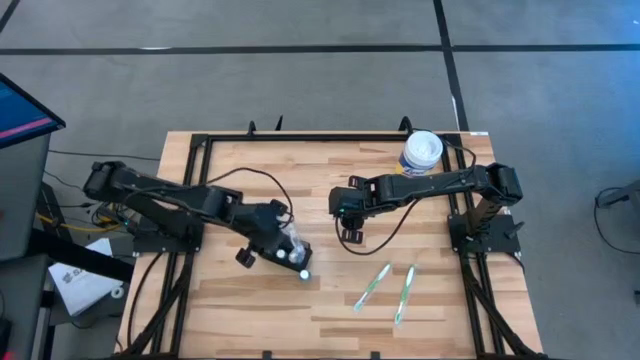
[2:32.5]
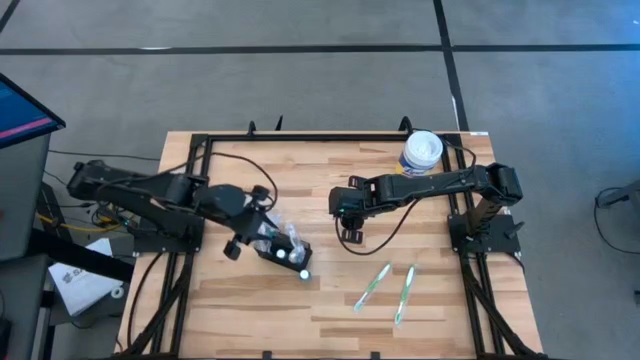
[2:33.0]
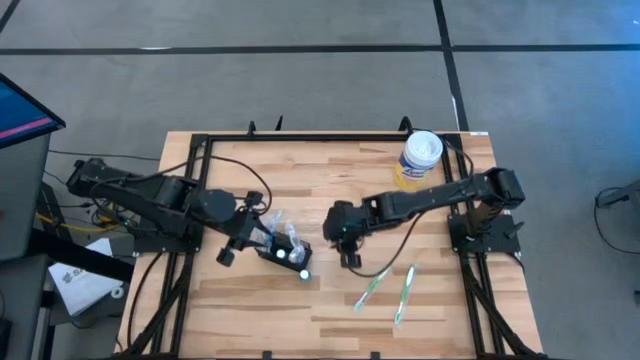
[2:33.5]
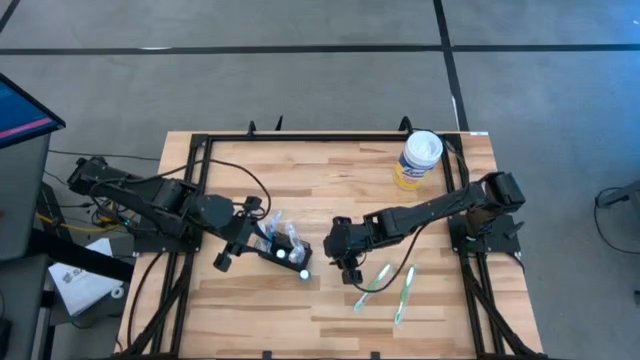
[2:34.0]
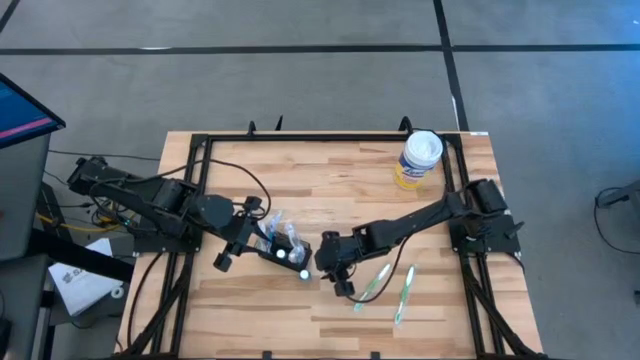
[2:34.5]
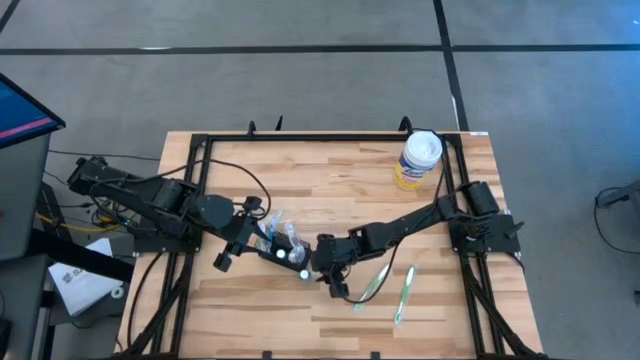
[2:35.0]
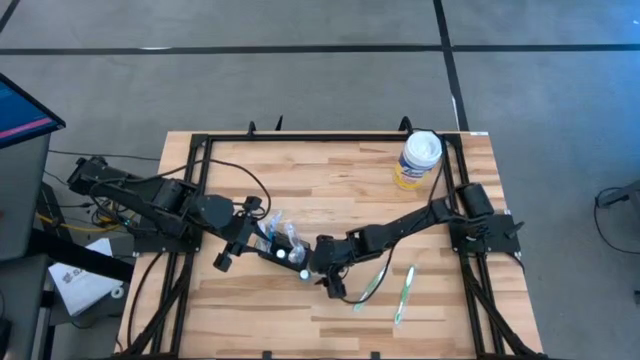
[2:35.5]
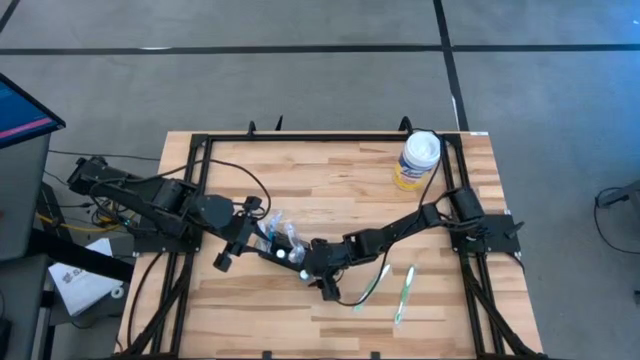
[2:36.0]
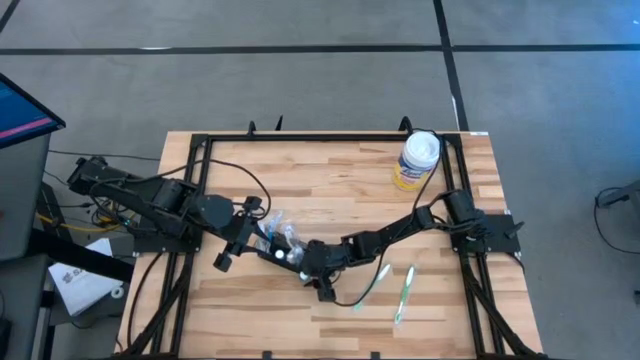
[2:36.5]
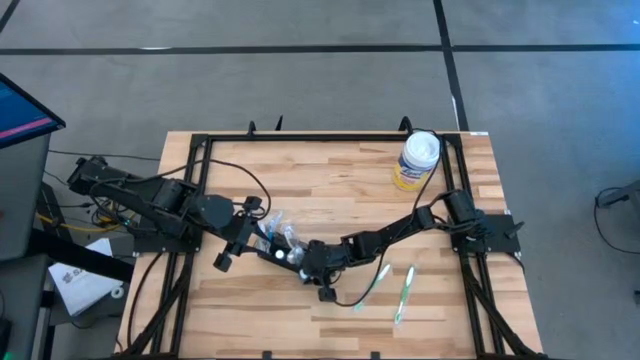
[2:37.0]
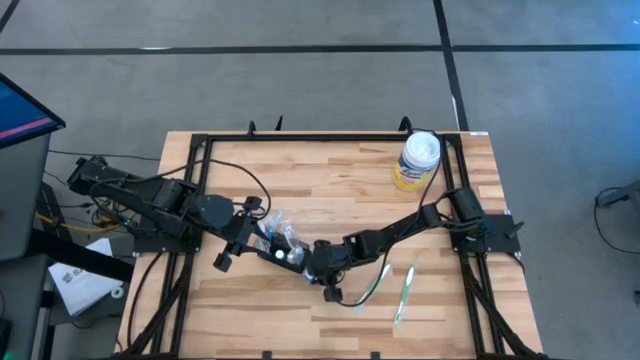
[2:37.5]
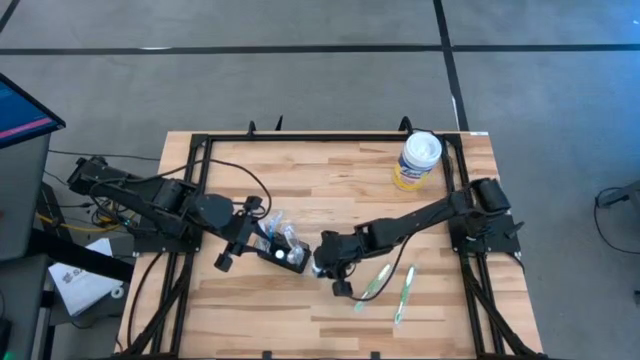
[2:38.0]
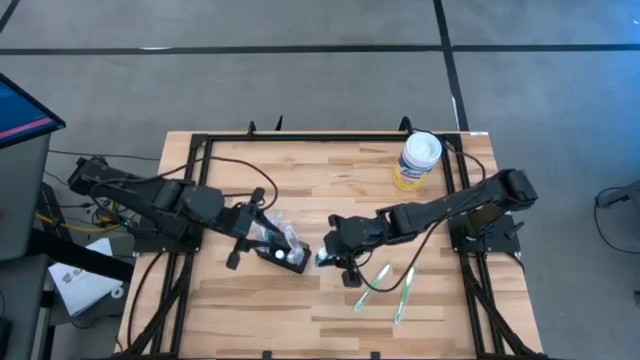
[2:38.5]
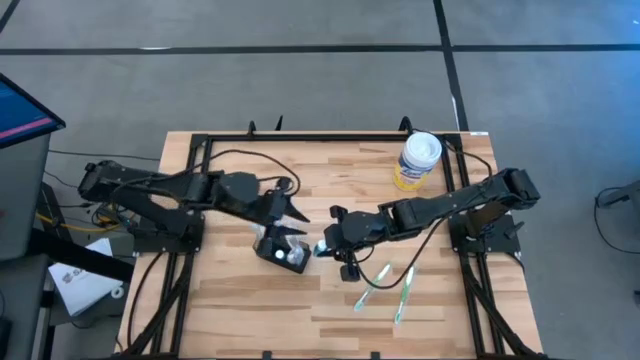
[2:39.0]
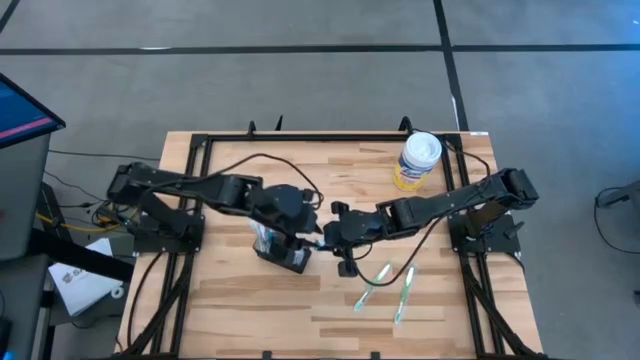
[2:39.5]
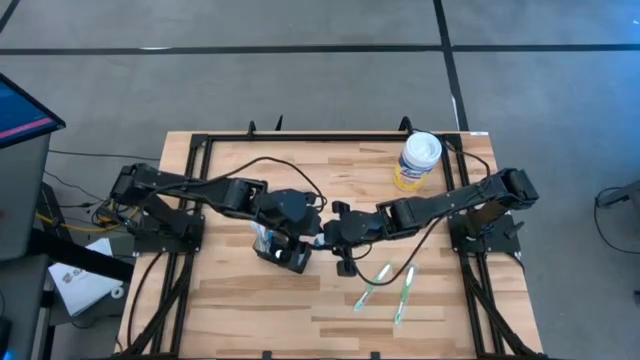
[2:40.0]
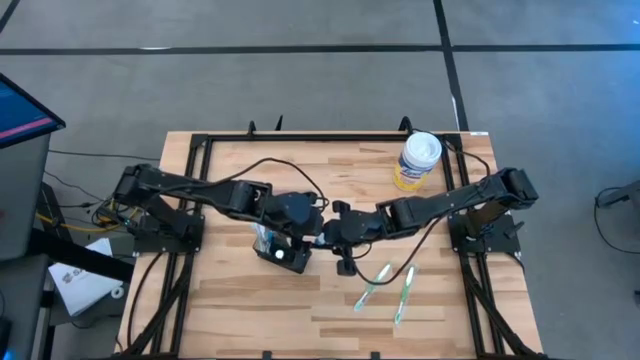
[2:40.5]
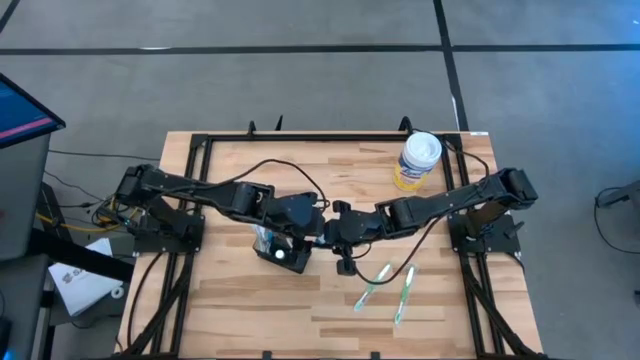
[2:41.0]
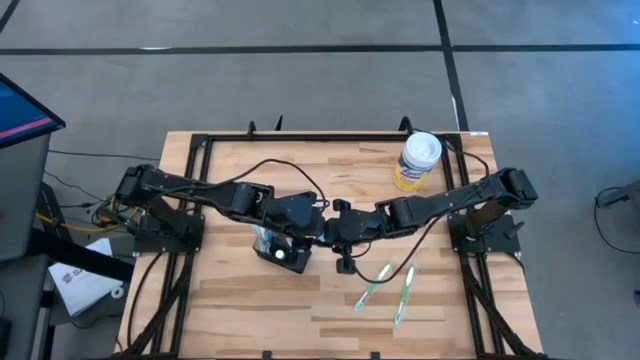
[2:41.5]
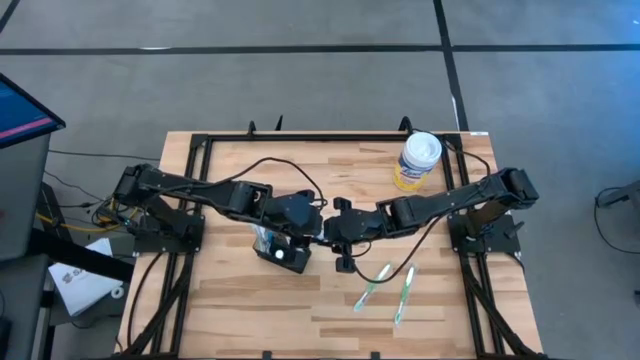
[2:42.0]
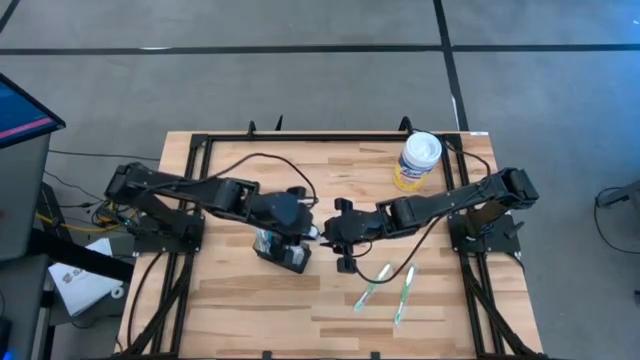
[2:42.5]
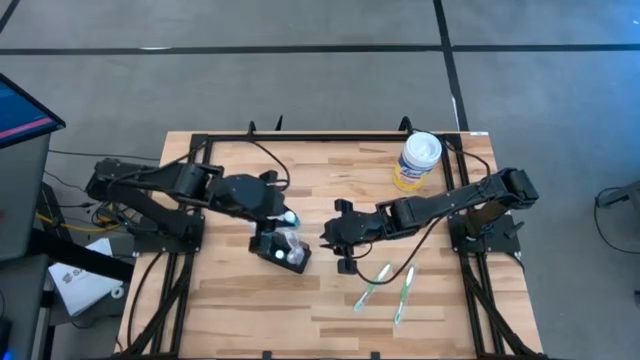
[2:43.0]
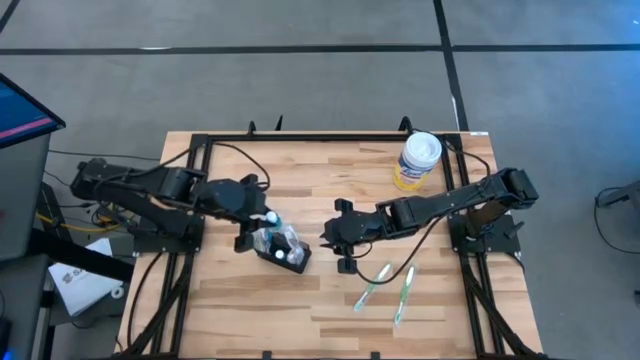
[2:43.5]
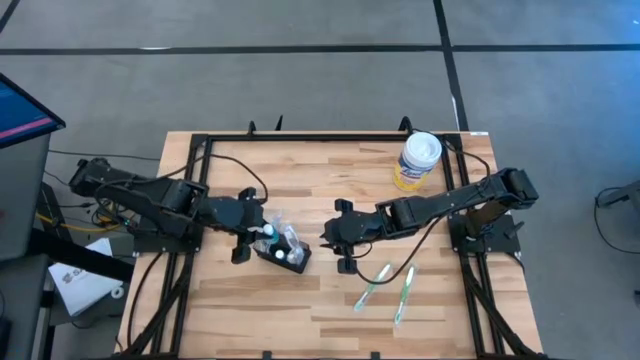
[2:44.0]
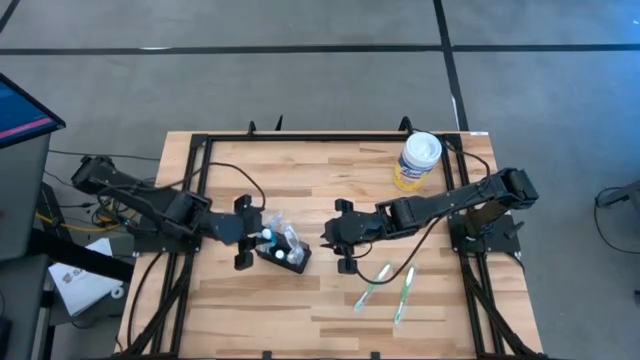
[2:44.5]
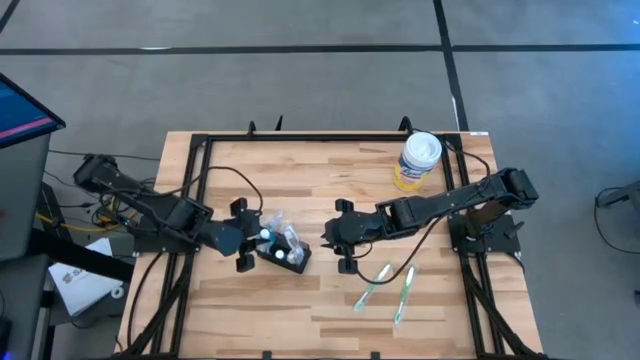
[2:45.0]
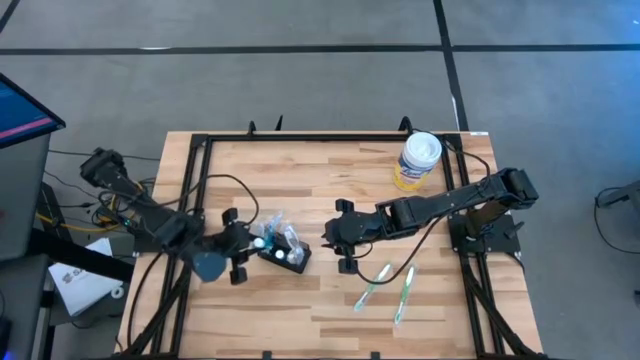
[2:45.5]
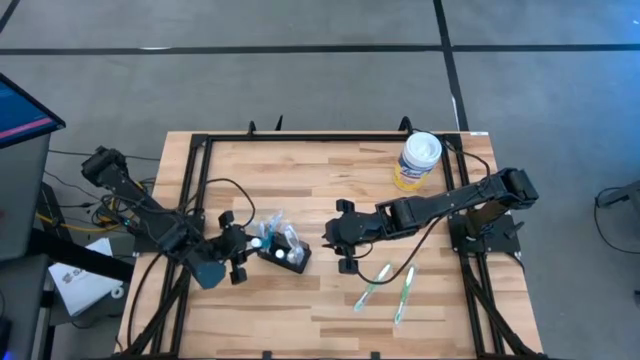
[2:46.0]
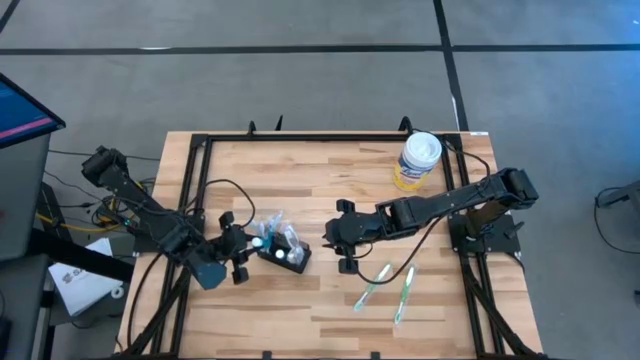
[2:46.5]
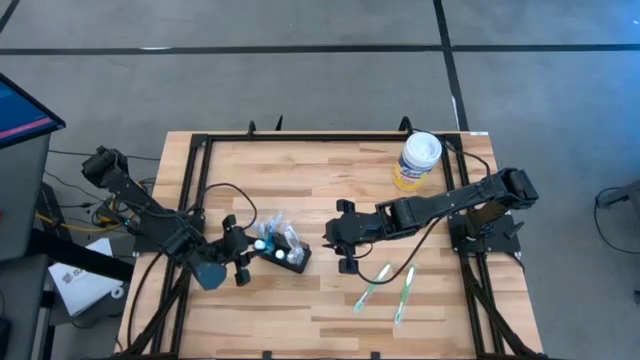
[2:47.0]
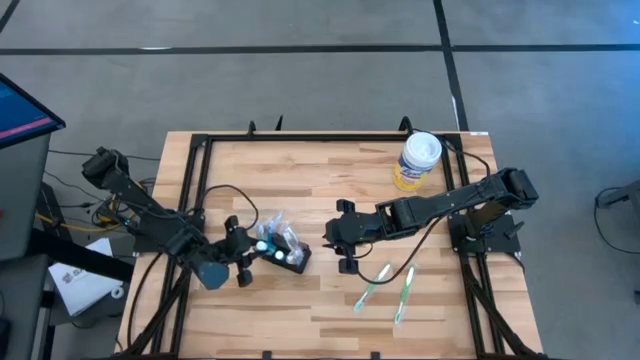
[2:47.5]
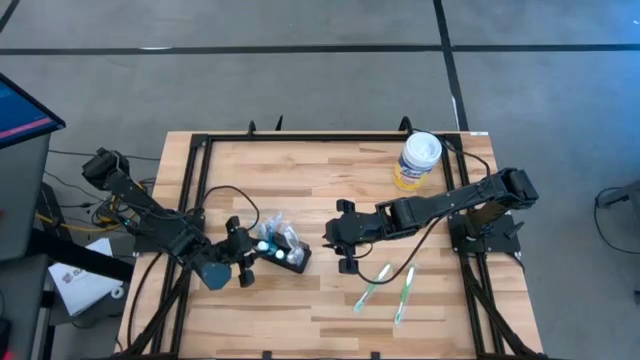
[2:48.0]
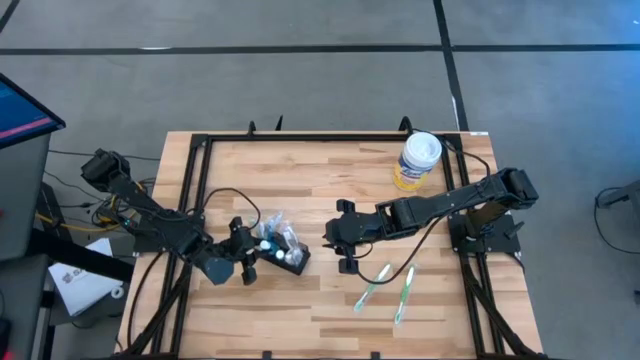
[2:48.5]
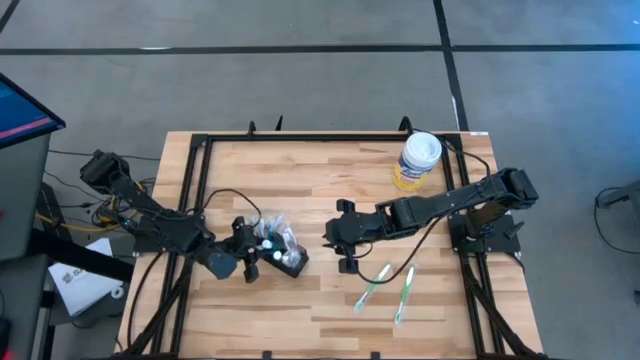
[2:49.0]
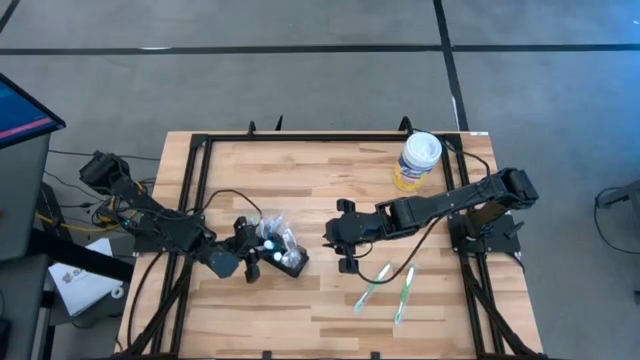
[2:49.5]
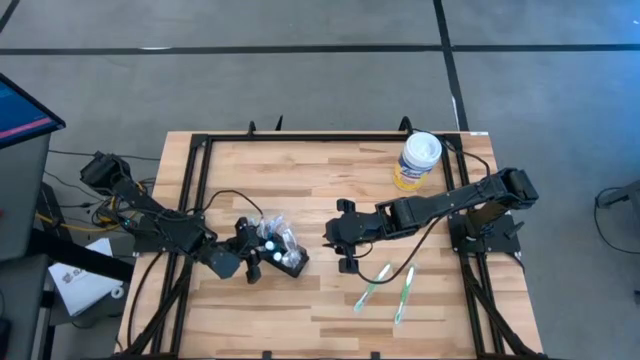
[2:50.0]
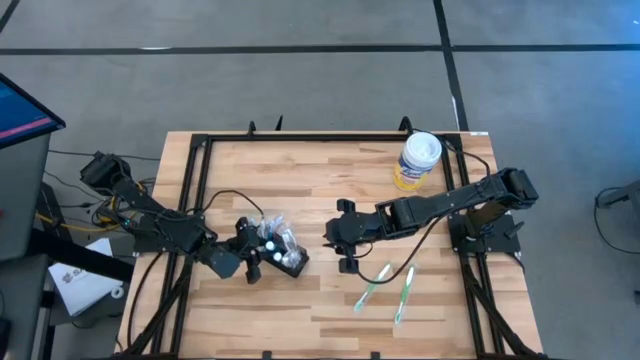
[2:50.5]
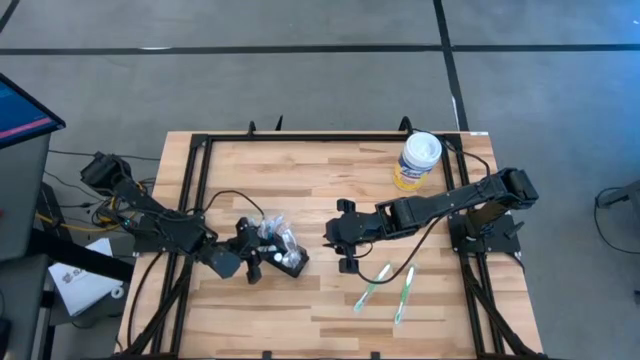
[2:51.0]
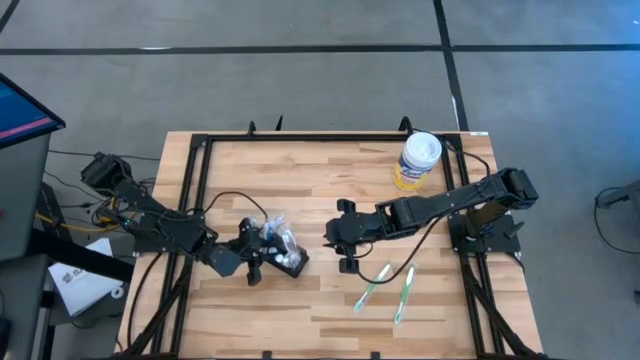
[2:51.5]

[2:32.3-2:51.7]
Task: Pick & Place toothbrushing station
Put the blue mouthwash into the middle compartment of the wire organizer

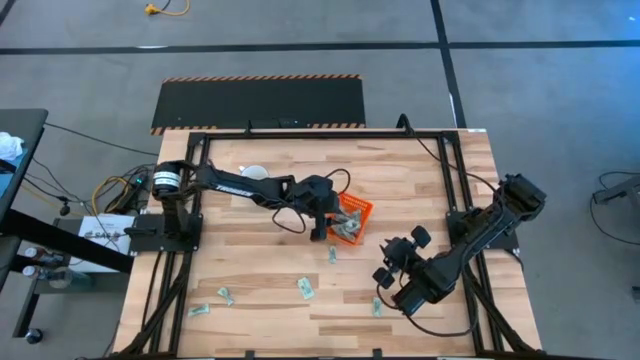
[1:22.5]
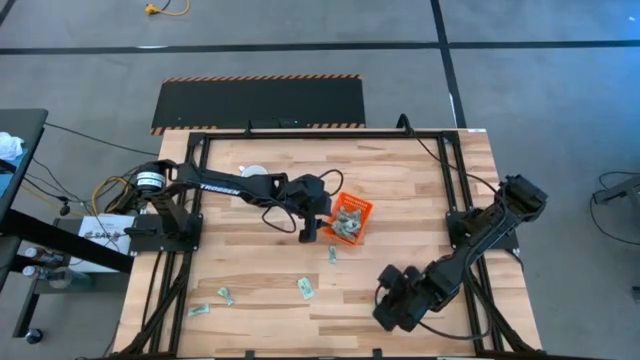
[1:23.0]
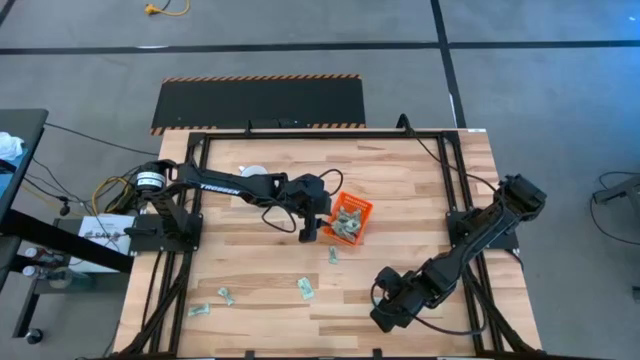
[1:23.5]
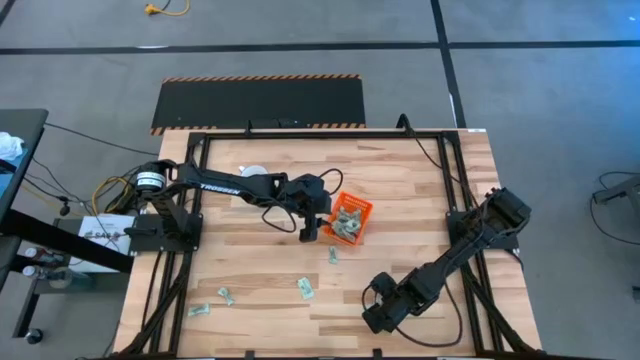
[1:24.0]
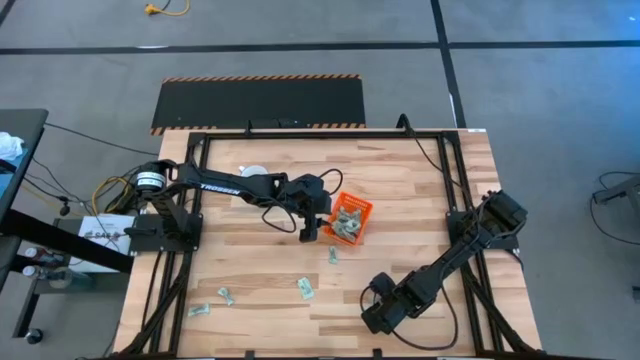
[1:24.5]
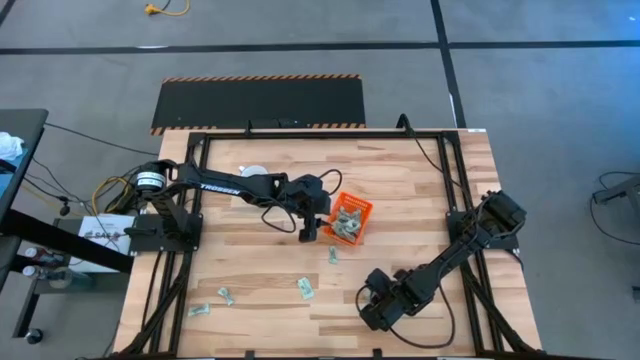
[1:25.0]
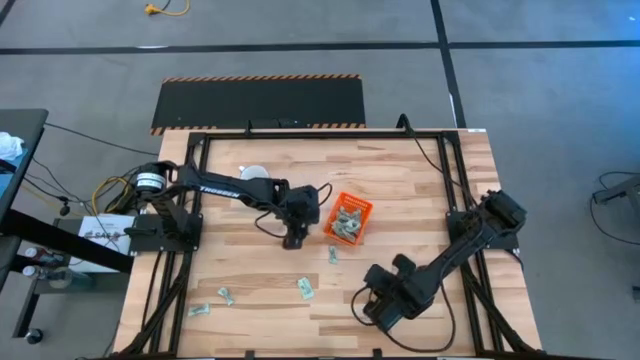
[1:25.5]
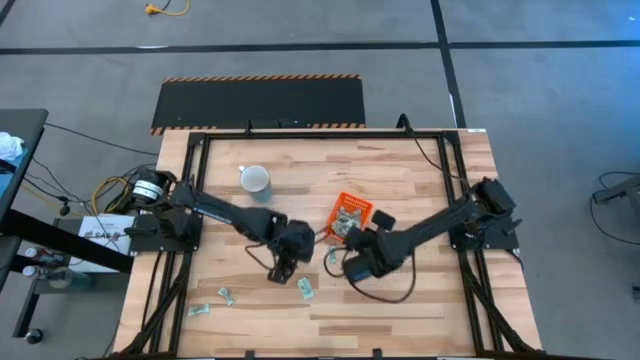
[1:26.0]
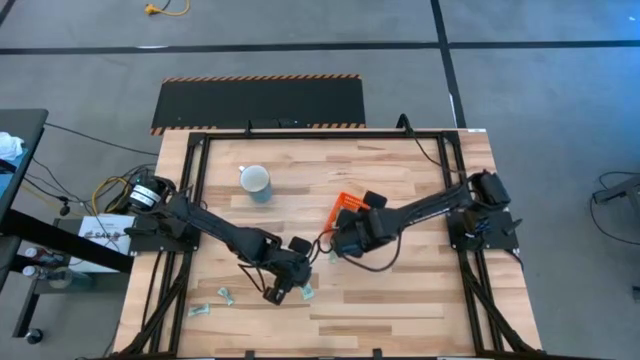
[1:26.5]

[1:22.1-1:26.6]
Task: Pick and place Stevia / Truvia into bins
Put the stevia packet into the basket
